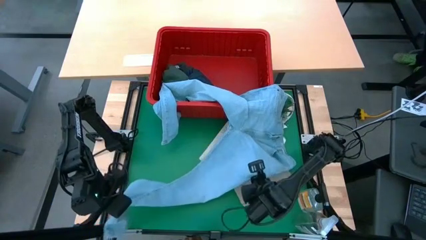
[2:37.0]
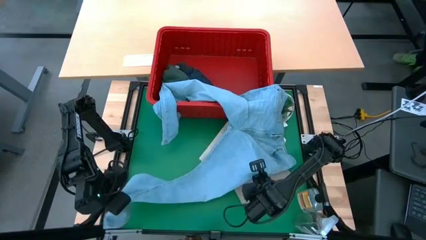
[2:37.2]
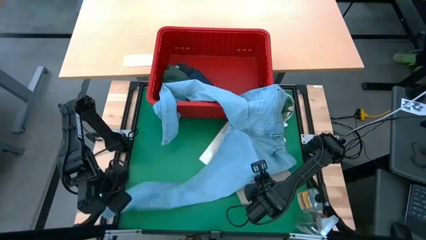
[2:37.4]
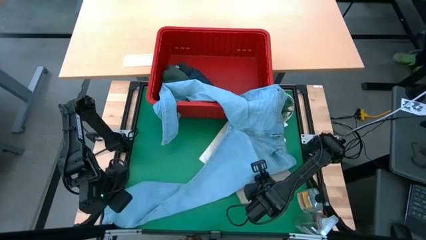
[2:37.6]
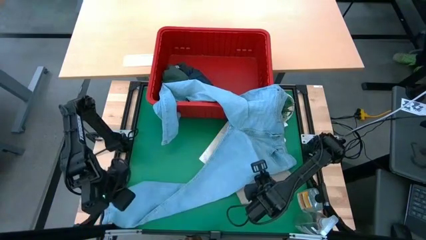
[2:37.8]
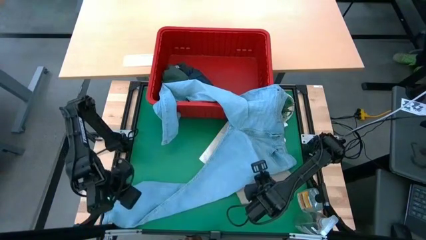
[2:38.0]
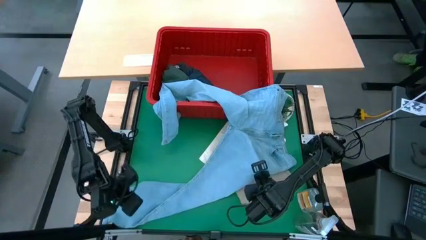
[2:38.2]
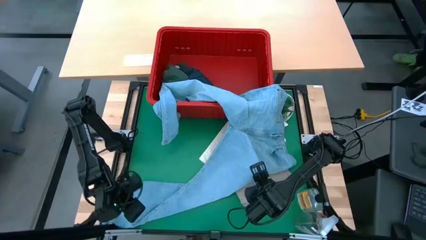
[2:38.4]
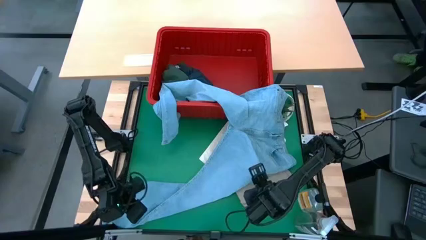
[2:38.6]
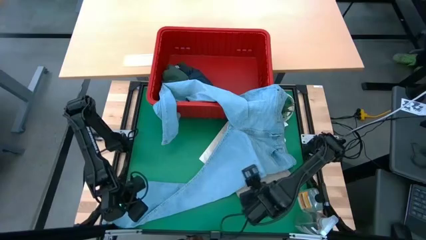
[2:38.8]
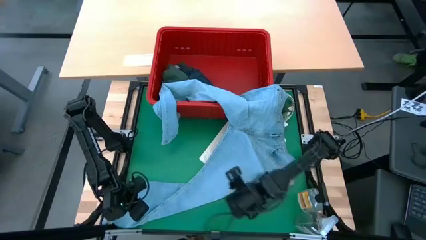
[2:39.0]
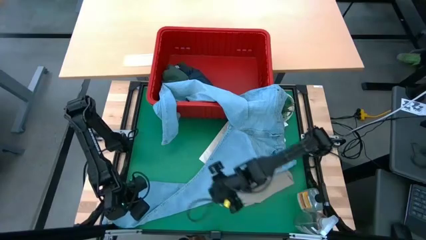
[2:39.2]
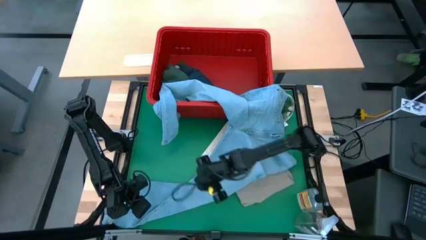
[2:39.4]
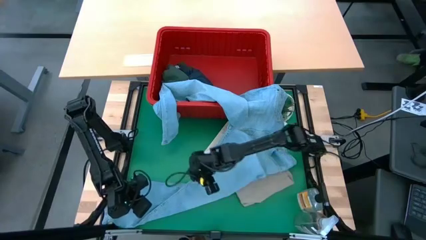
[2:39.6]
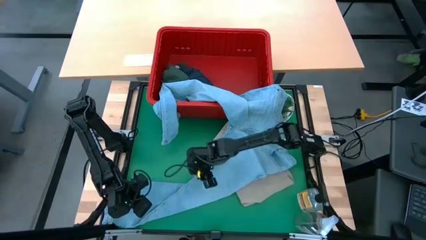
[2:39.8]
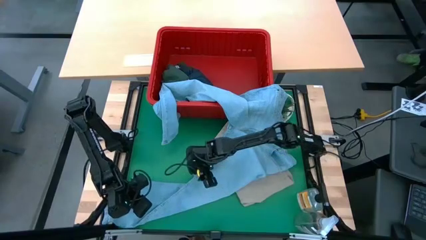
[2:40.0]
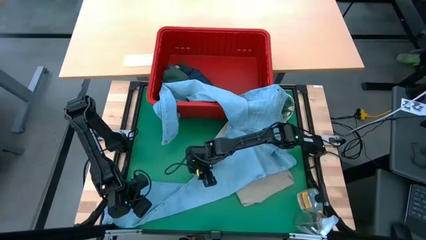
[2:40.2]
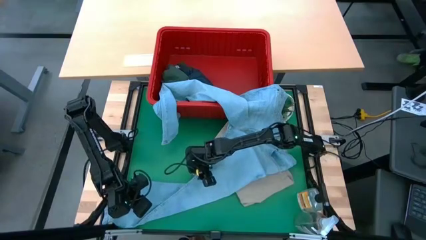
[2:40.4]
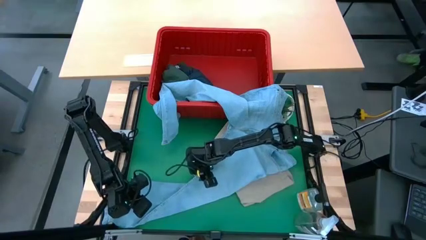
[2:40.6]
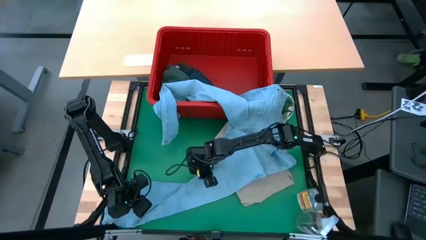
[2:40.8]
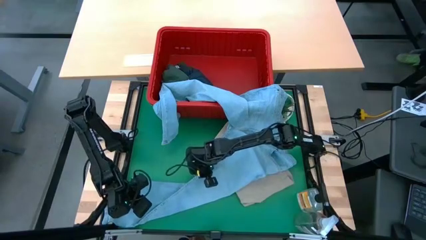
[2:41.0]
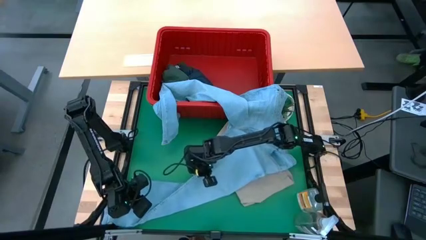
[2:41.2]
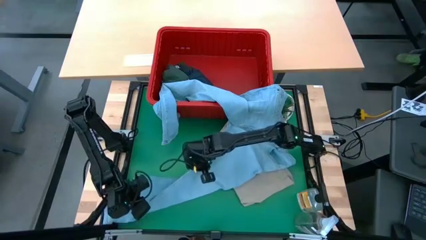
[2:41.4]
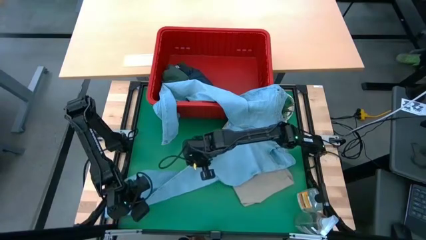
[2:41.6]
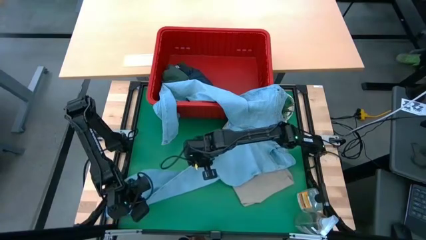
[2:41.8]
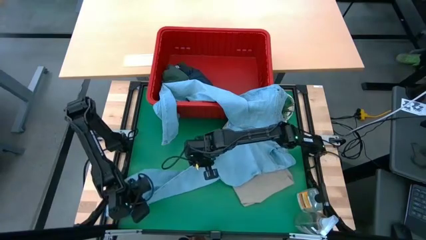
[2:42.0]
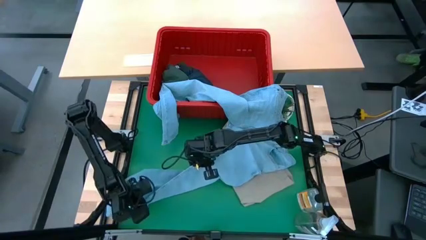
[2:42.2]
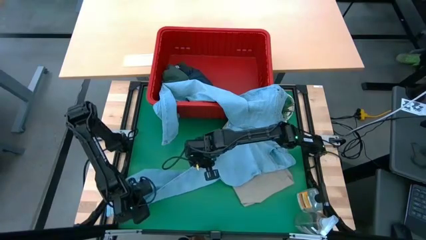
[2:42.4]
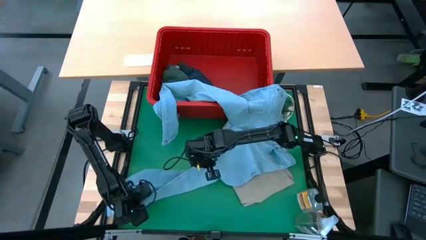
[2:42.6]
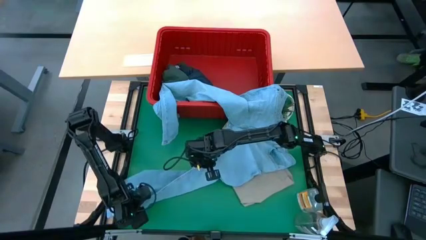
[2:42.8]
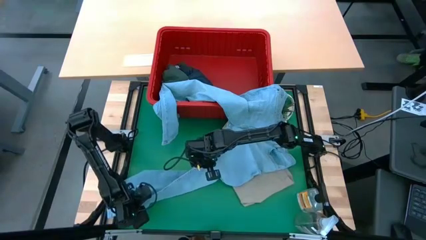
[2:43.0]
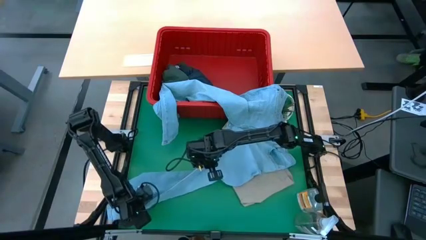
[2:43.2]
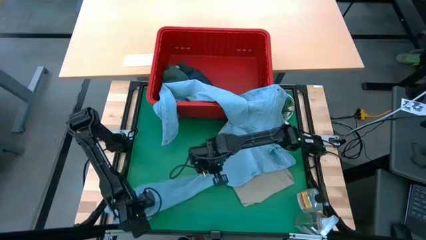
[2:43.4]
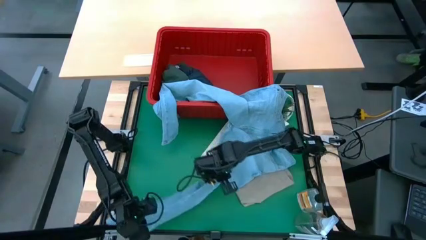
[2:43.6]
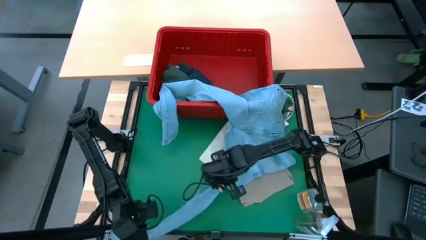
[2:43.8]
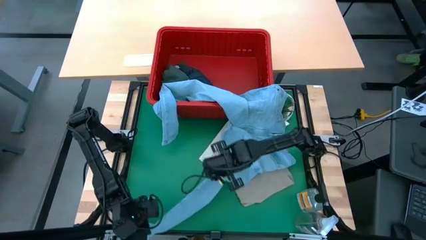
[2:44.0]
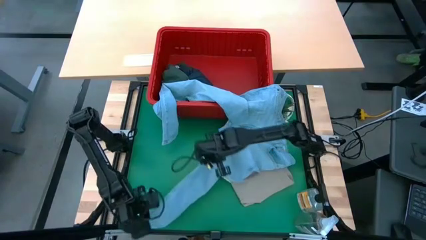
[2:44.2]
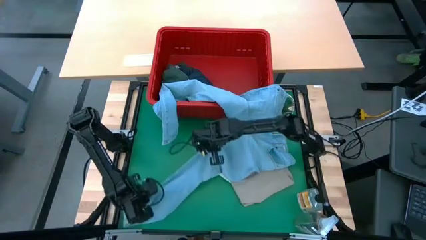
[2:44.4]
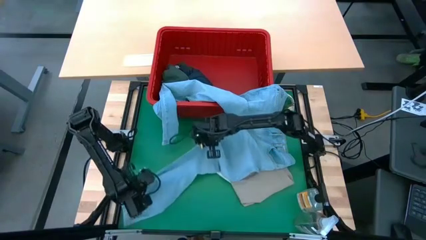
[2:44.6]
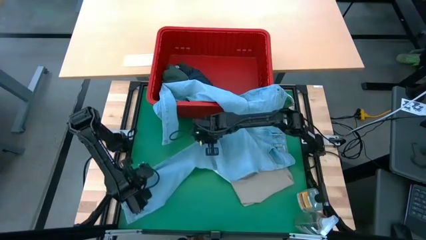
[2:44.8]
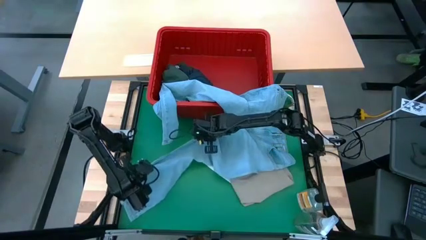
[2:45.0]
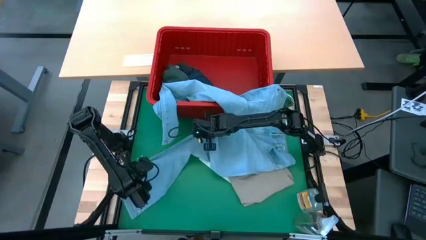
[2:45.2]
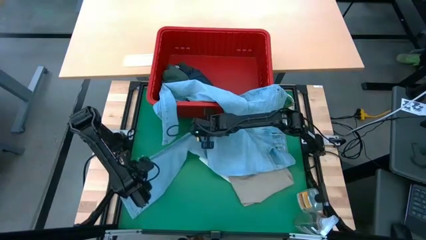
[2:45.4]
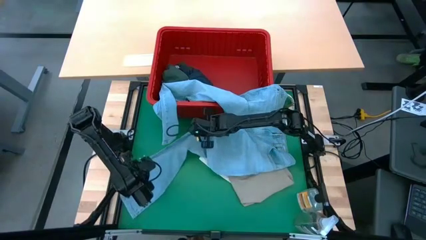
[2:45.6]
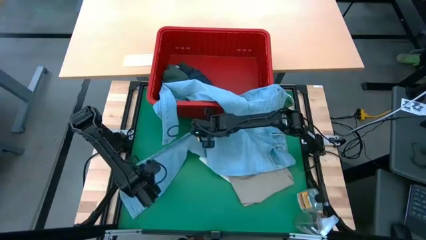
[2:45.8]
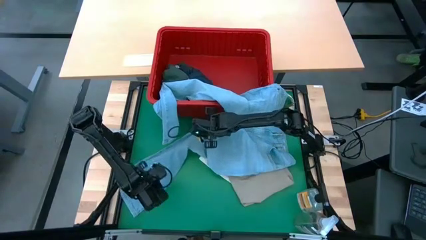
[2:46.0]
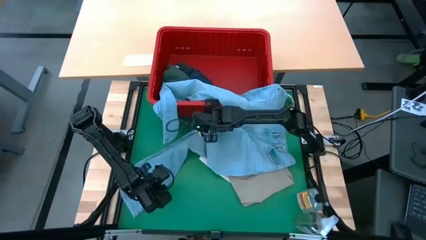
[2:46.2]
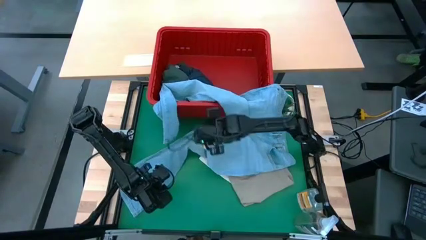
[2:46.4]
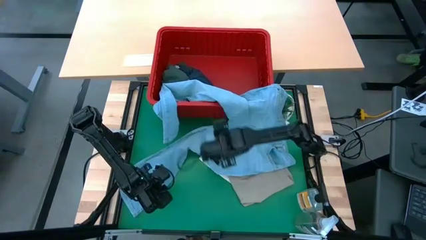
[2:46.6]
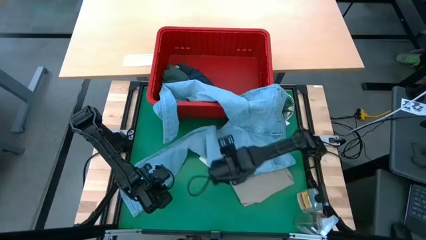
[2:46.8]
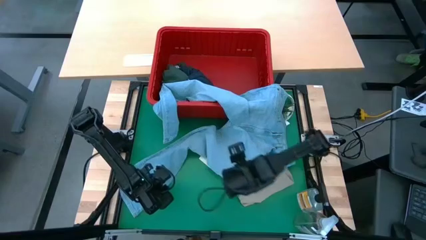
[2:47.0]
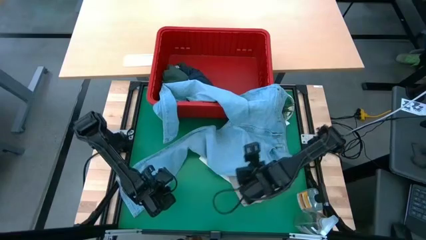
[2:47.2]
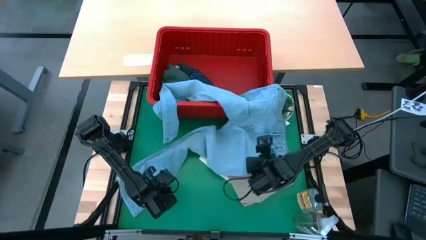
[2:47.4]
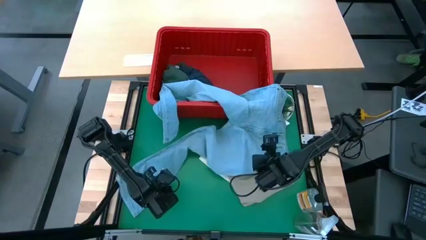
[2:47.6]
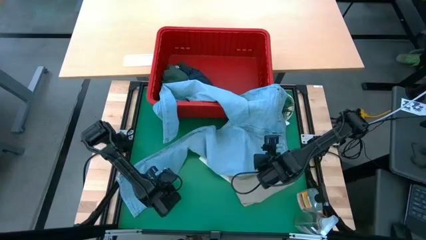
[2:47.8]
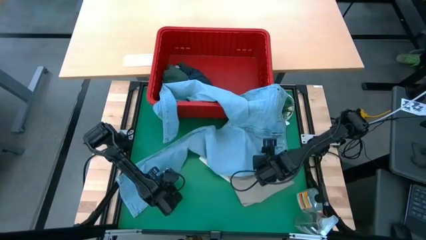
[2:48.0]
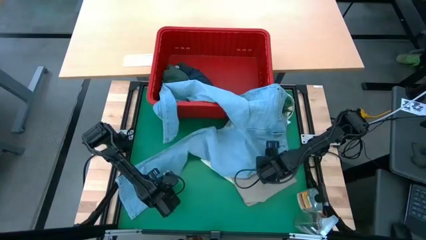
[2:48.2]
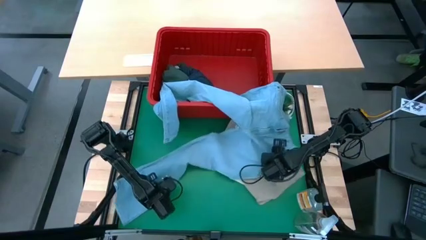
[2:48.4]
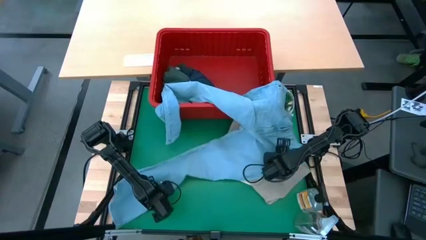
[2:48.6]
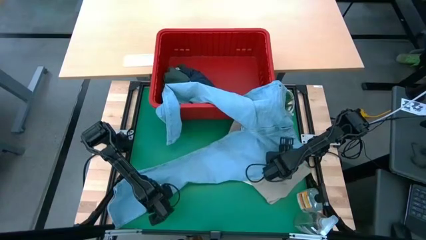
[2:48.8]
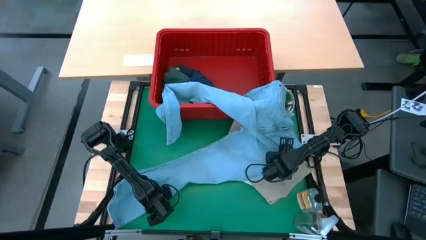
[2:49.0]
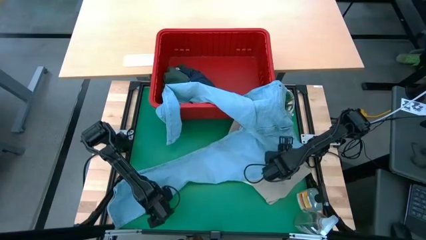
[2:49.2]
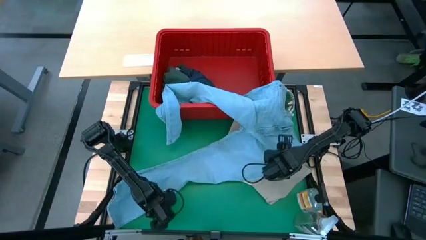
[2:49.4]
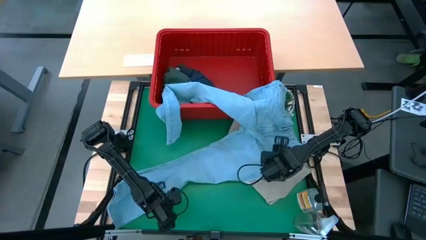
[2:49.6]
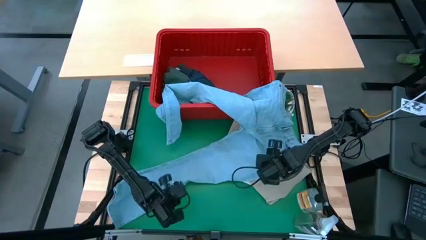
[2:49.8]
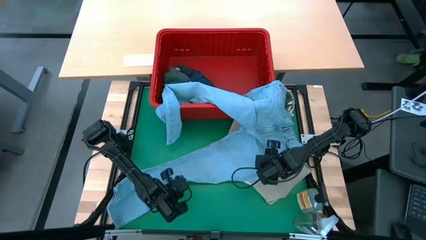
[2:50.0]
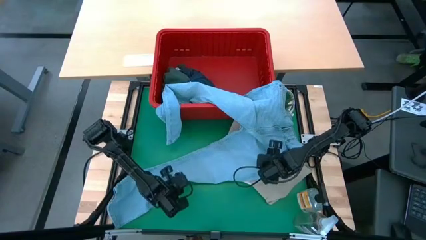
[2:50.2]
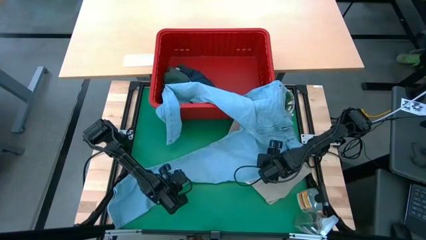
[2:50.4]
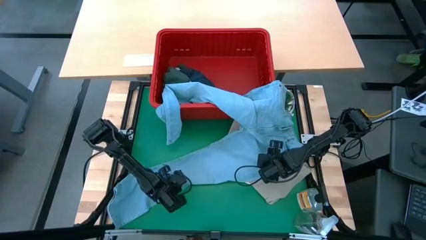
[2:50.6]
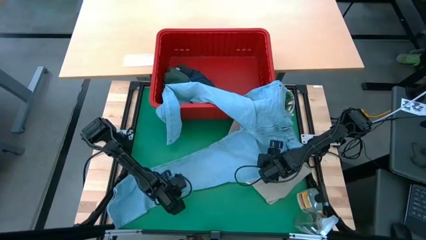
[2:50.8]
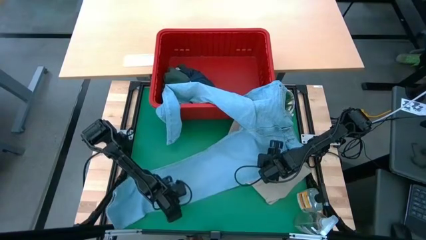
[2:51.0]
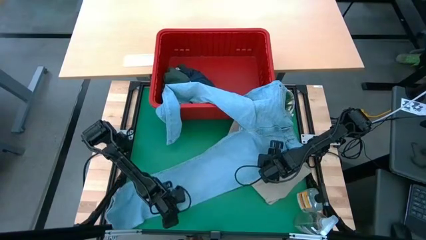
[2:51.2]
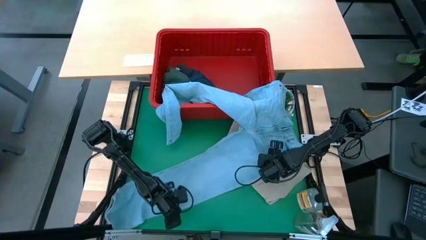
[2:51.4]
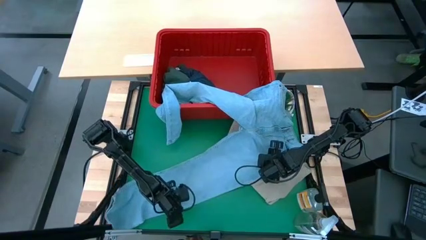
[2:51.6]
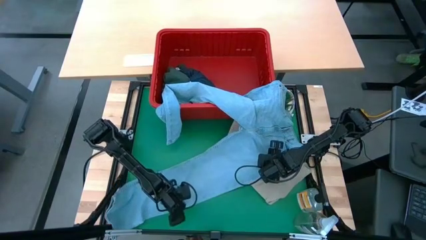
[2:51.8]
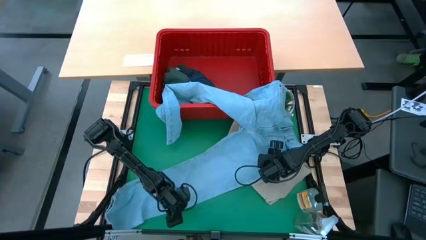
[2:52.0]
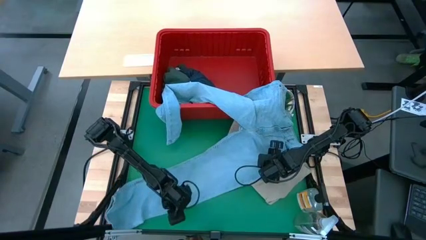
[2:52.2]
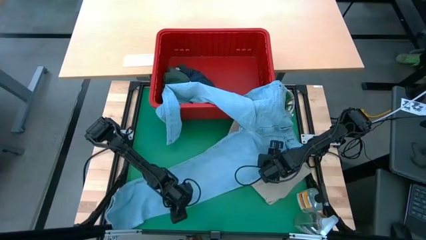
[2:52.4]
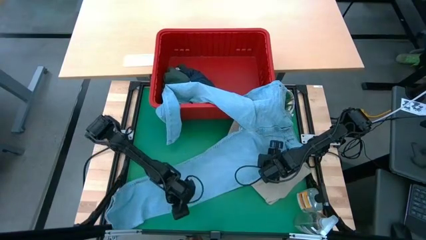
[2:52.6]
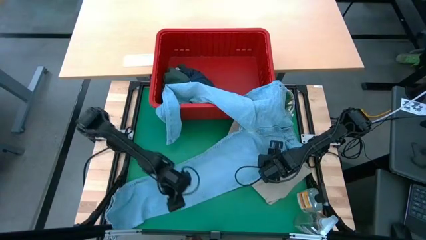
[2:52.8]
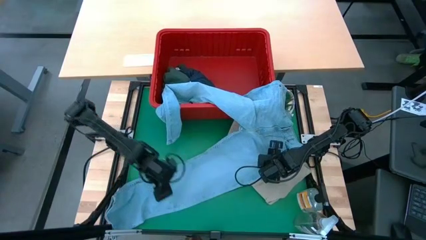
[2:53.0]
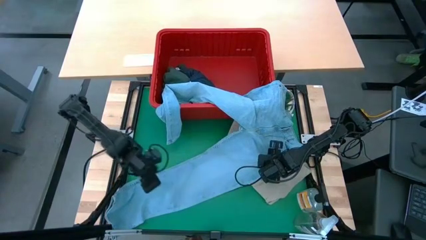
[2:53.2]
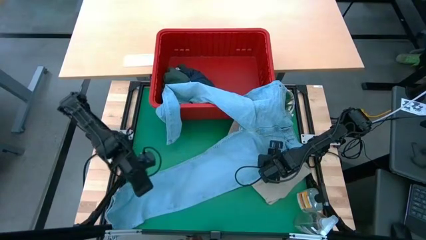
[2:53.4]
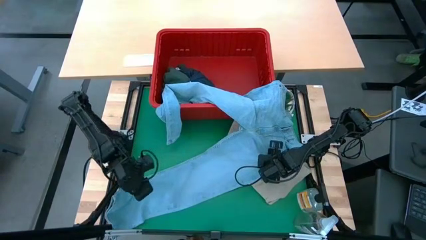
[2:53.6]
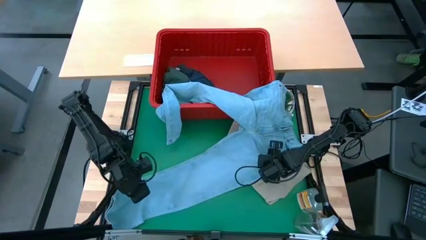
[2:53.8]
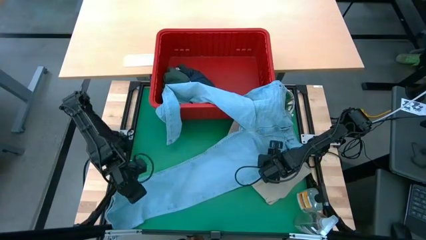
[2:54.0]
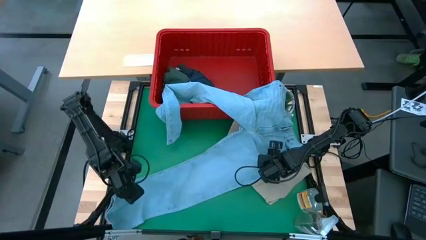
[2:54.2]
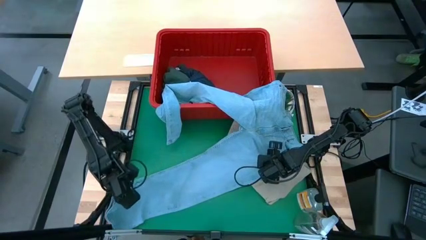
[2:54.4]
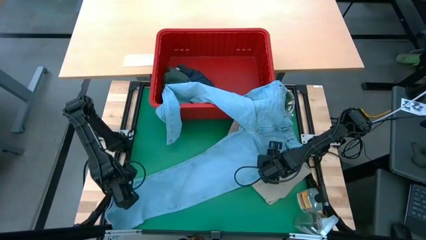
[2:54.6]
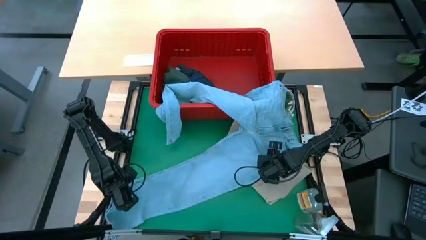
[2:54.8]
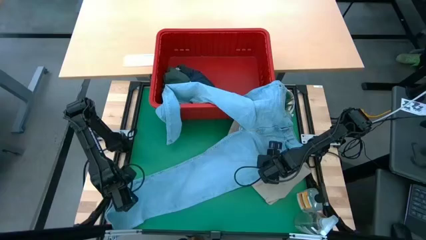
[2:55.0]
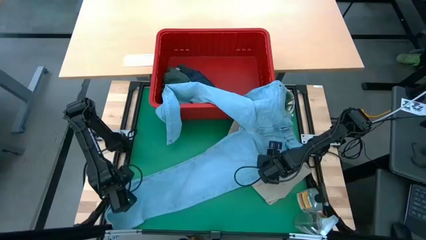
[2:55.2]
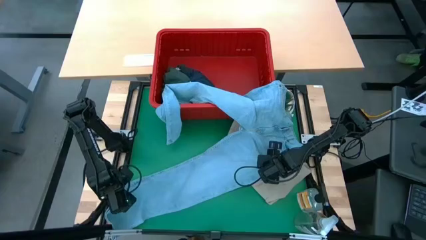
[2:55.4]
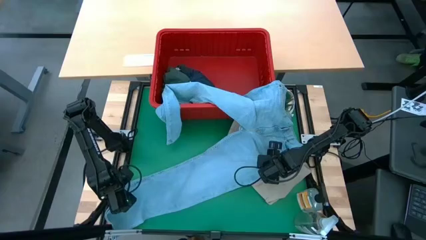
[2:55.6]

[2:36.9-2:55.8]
Task: Fold Laundry from Bin
Fold the light blue jeans
